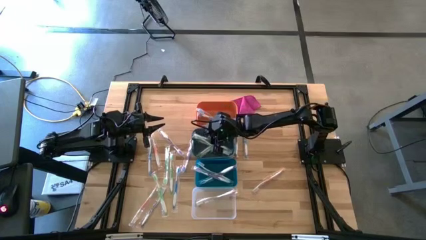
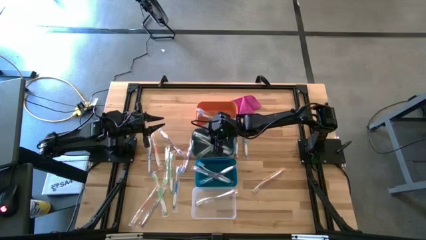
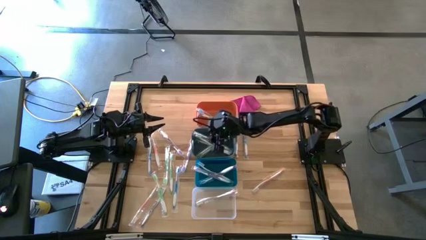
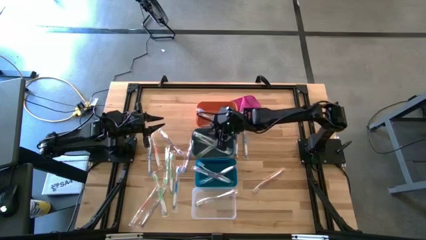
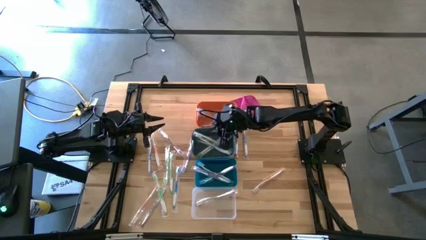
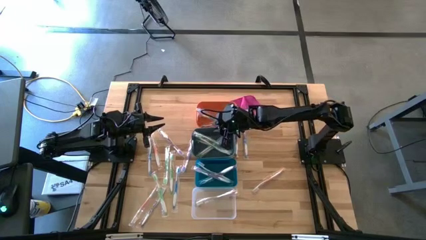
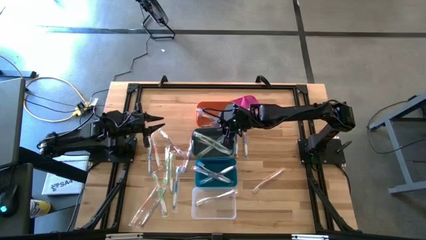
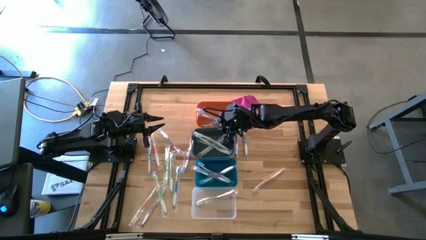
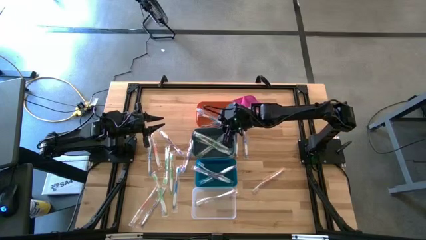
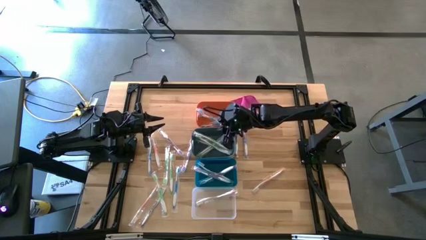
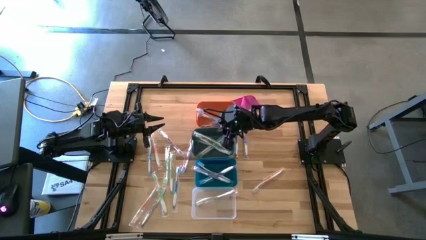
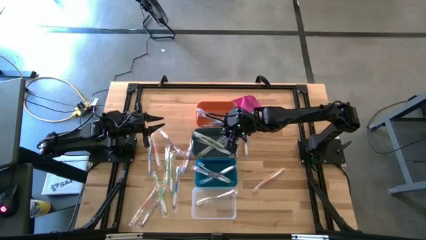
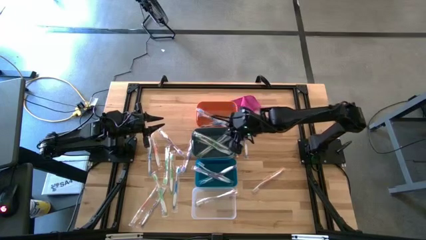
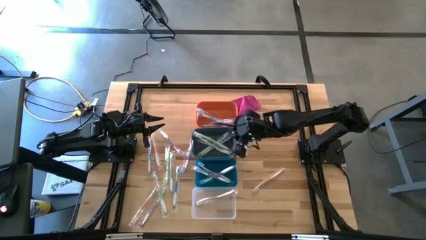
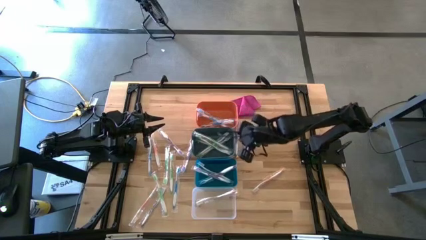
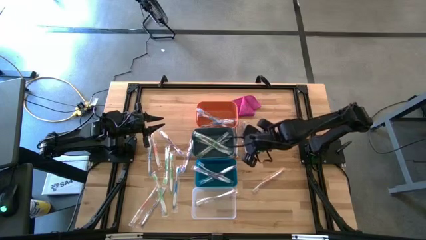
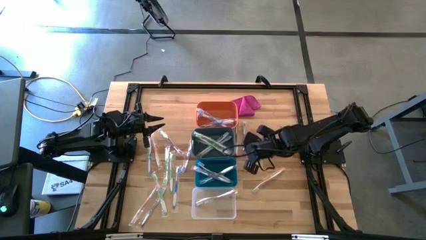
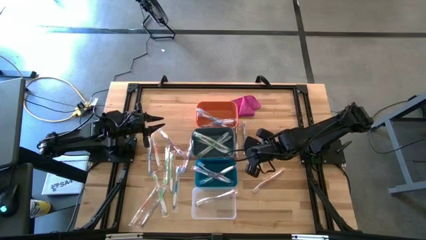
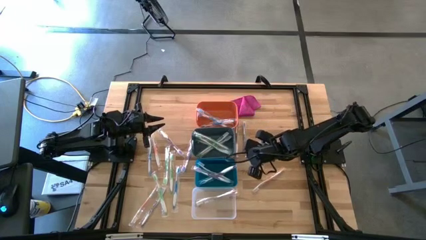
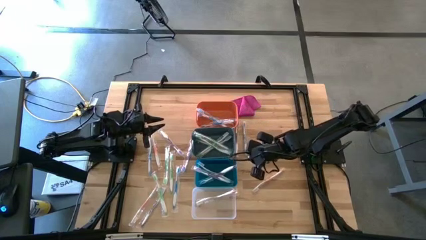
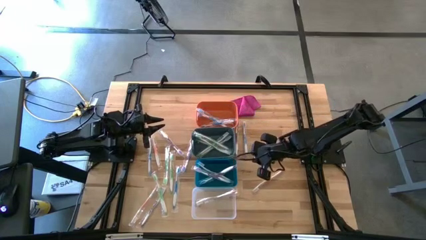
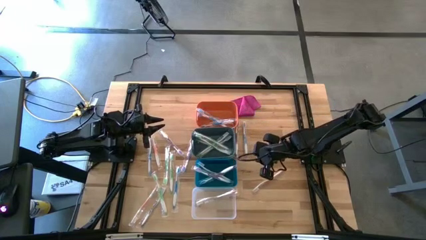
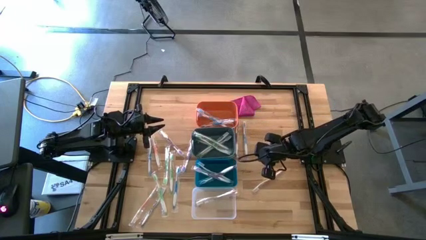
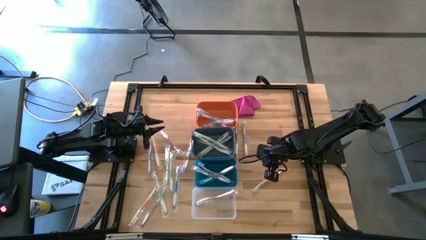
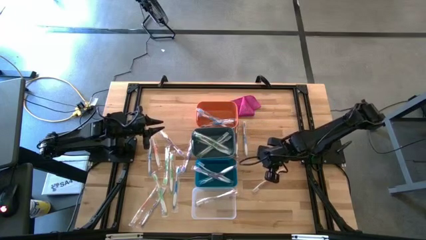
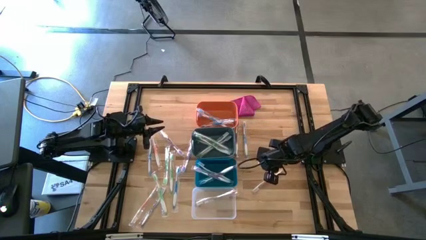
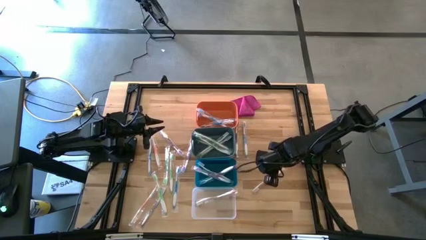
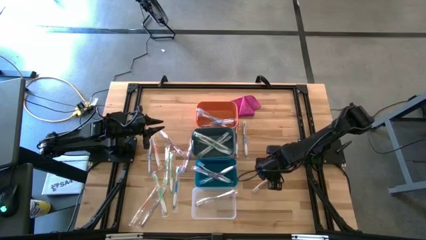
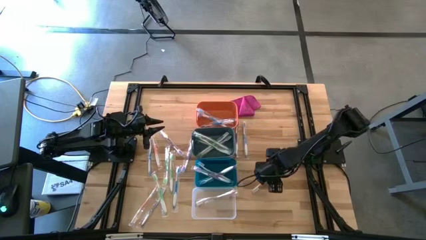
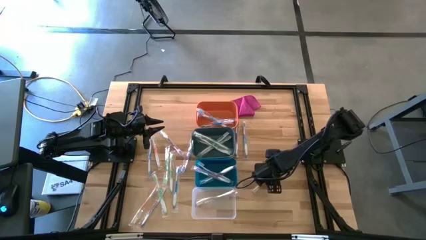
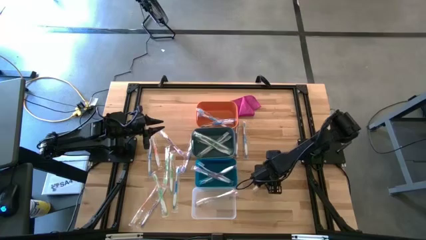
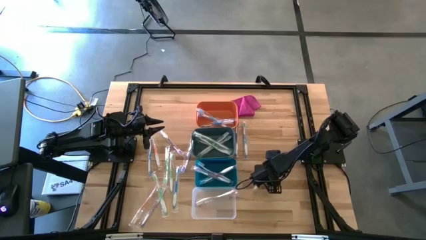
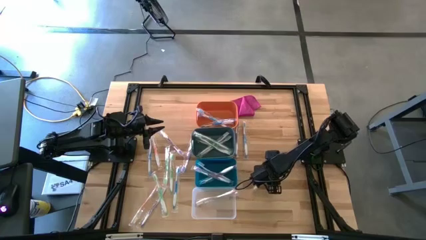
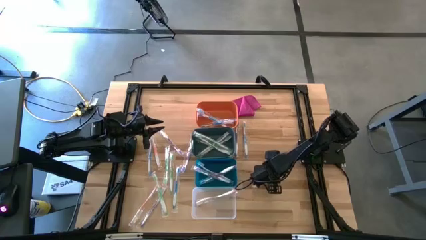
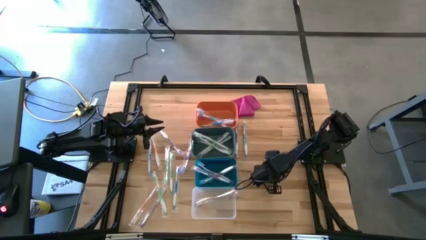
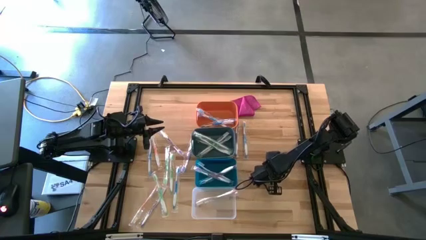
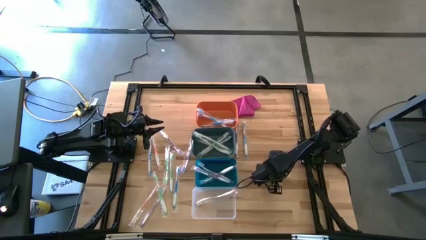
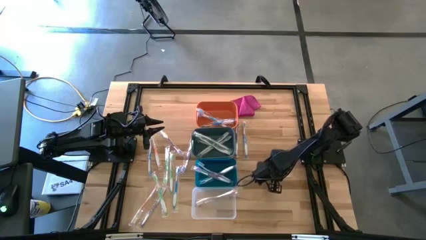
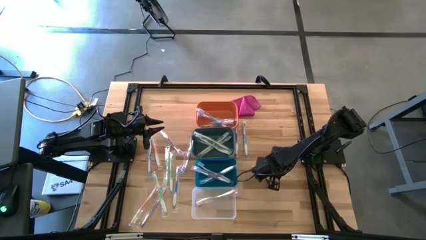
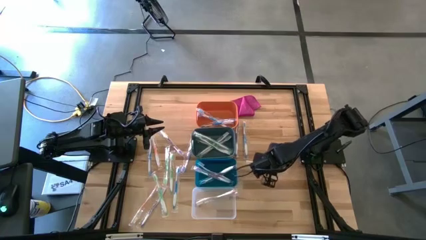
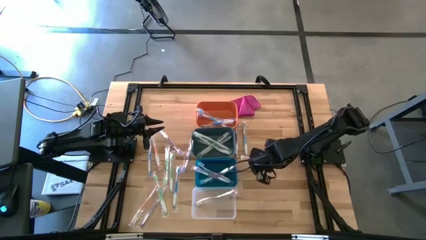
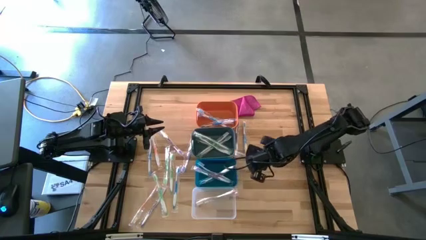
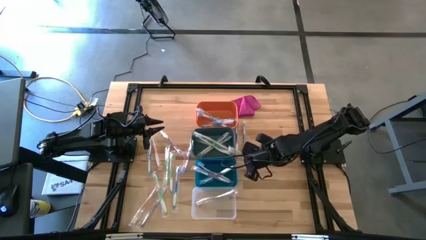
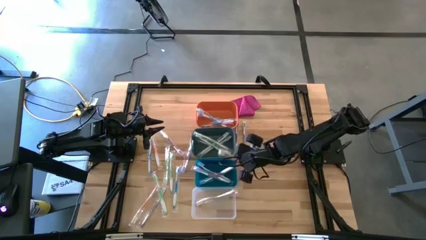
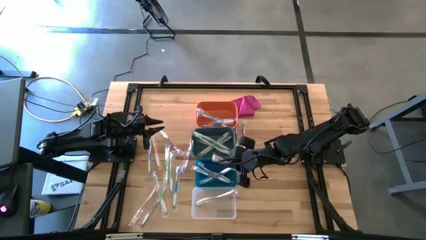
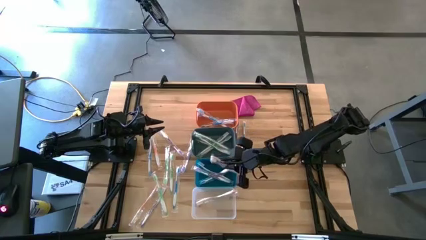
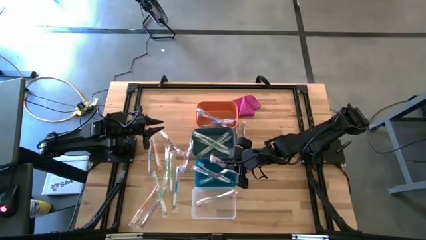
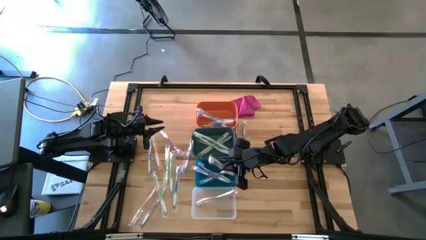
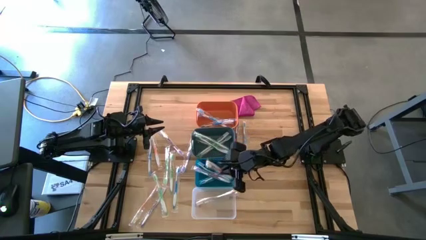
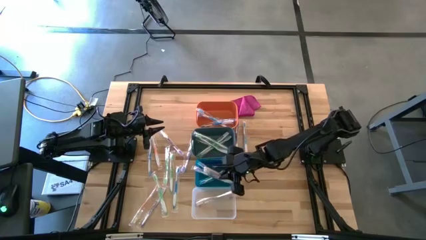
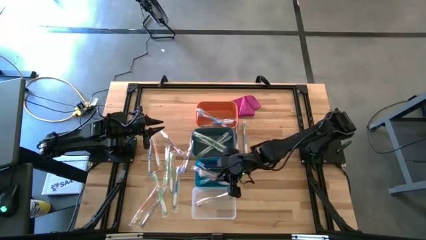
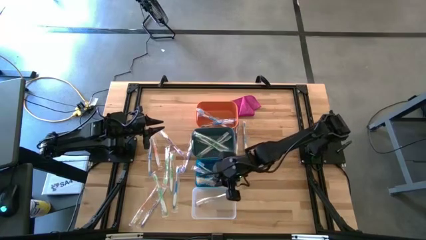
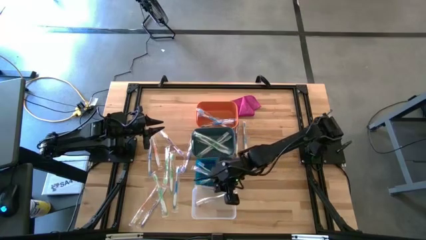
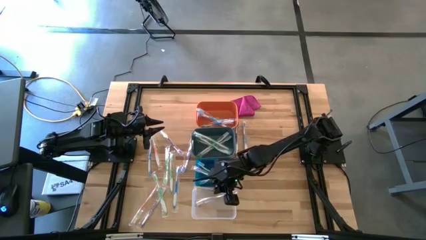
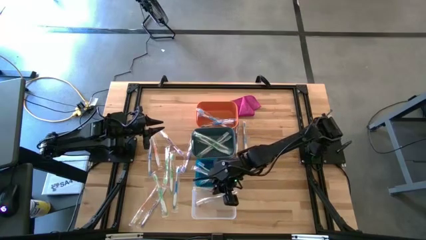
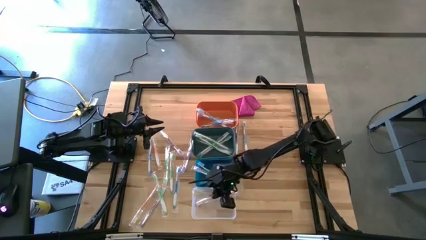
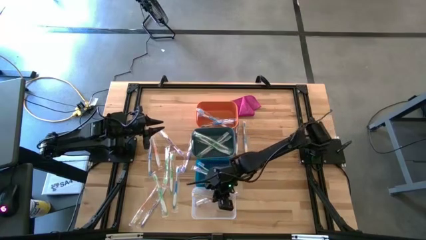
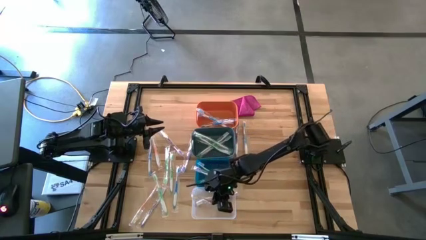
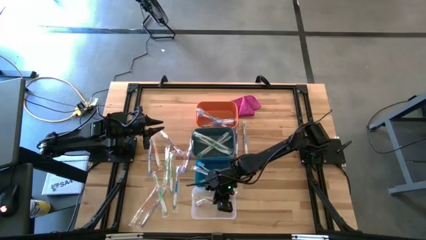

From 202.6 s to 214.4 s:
Task: Pick & Place Toothbrushes
Put the orange toothbrush into the transparent bin

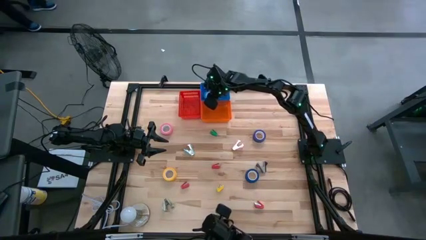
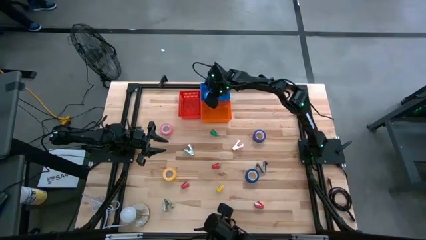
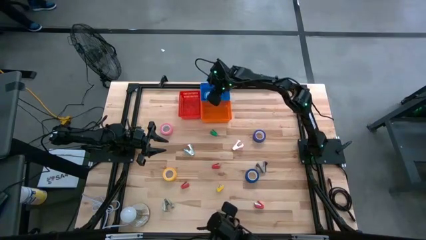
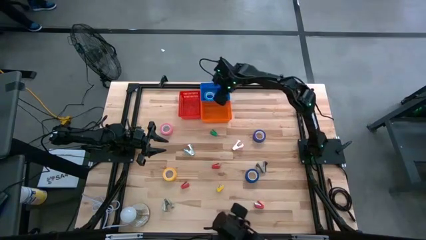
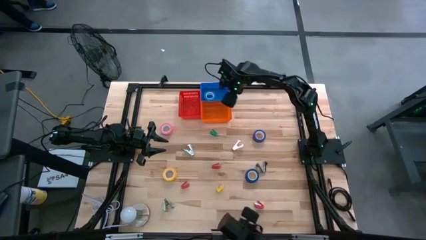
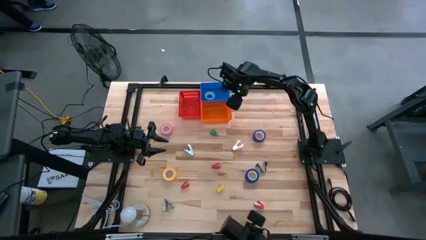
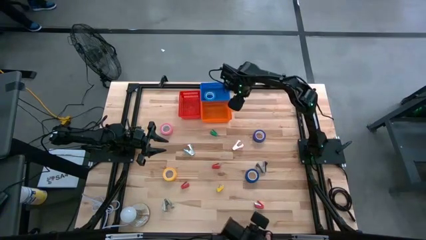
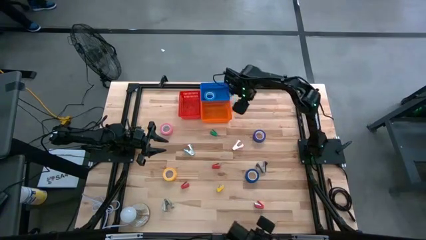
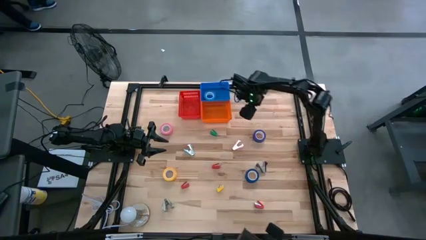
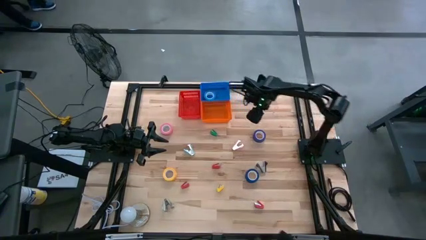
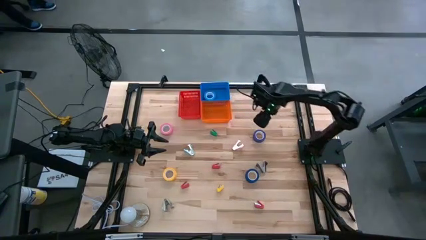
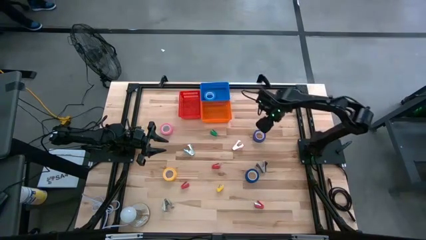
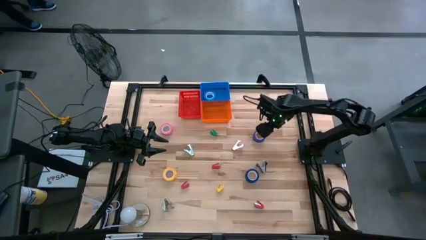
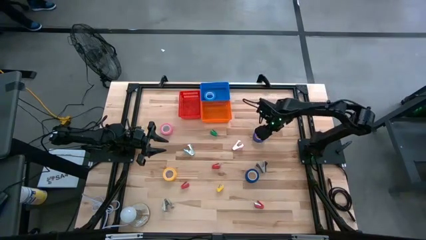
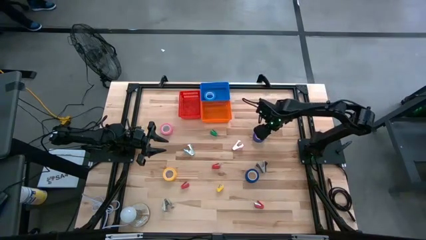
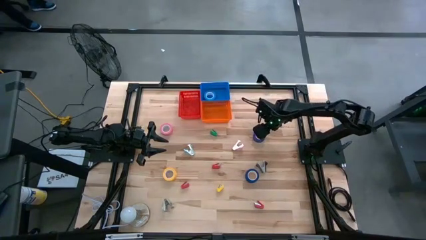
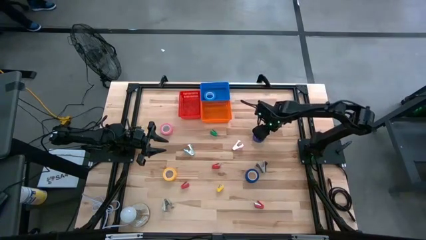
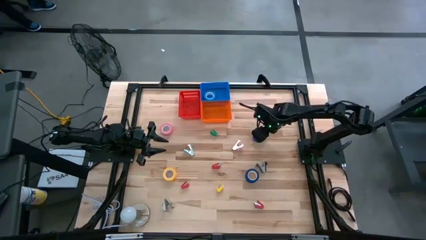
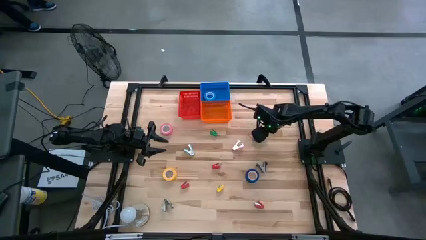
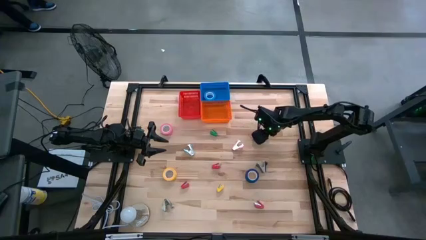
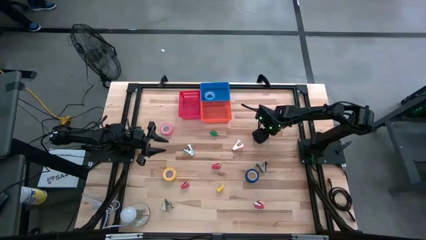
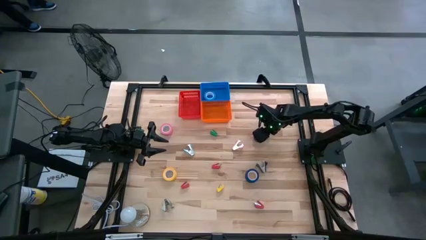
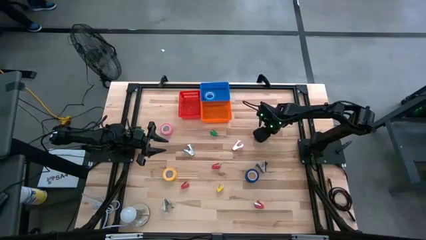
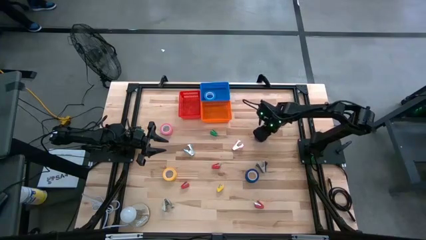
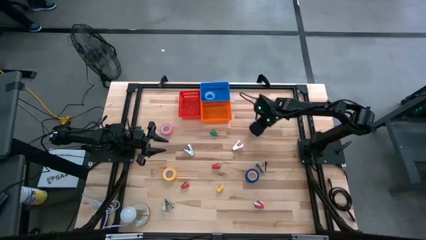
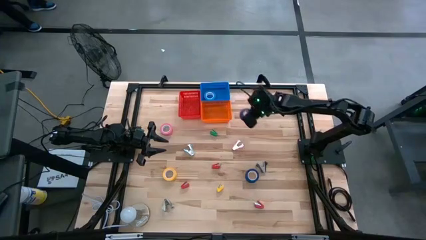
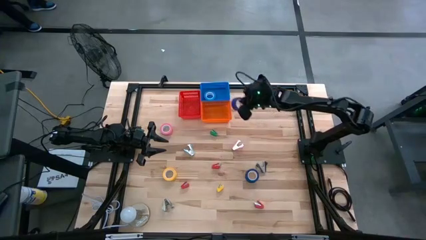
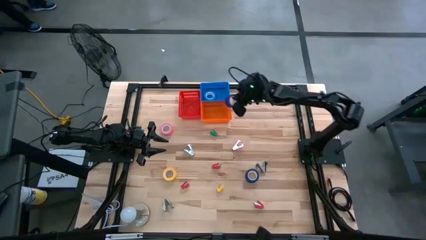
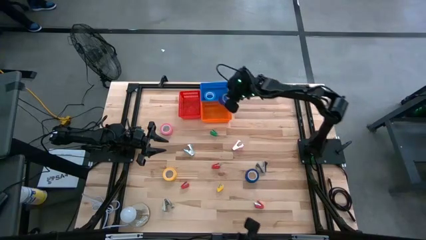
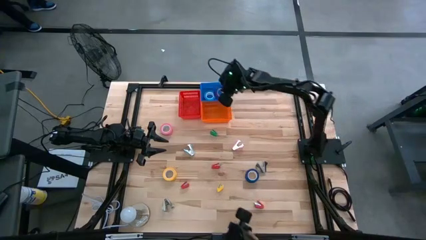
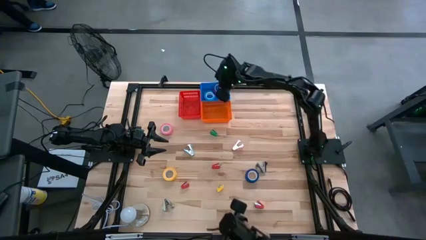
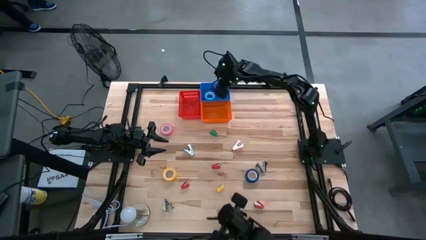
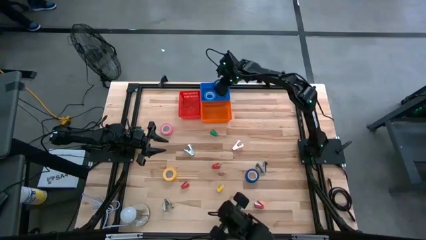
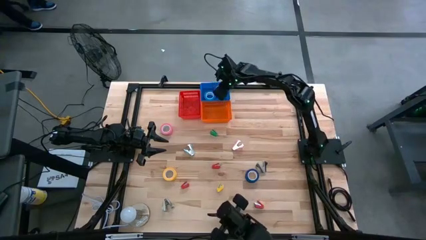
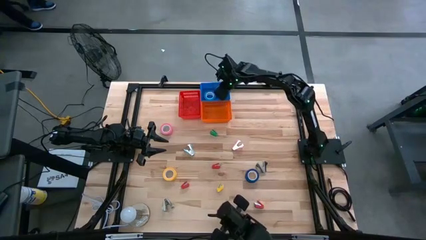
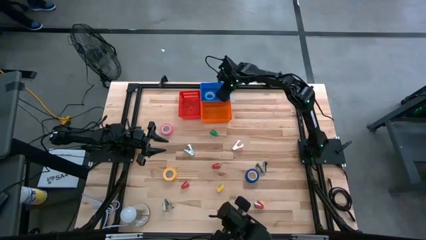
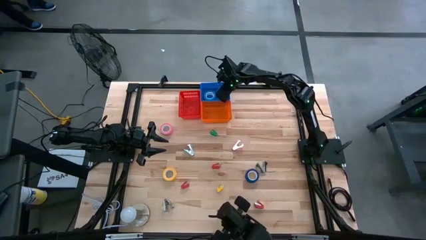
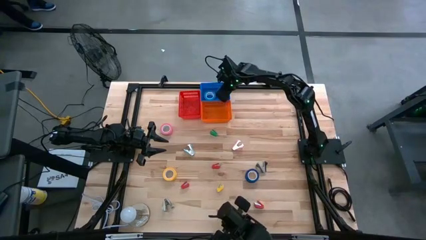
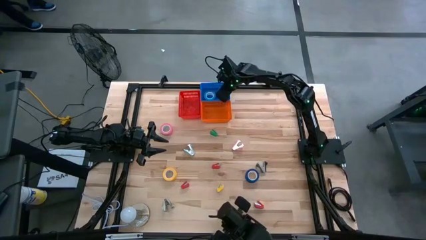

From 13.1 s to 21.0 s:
Task: Pick and place Stapler, Stapler remover, tape
Put the purple tape into the blue bin
